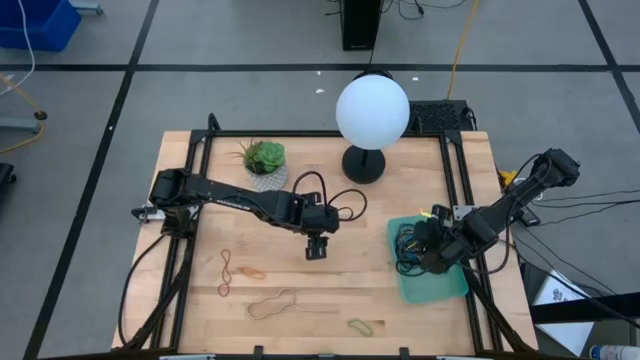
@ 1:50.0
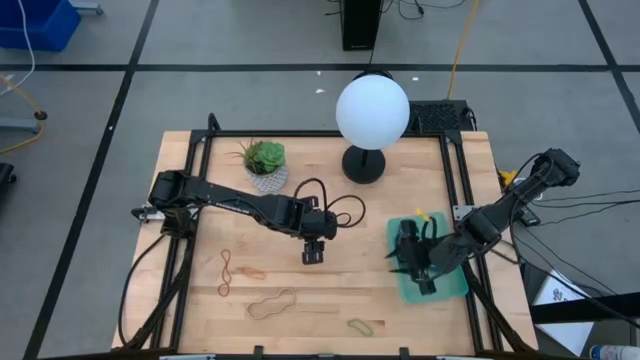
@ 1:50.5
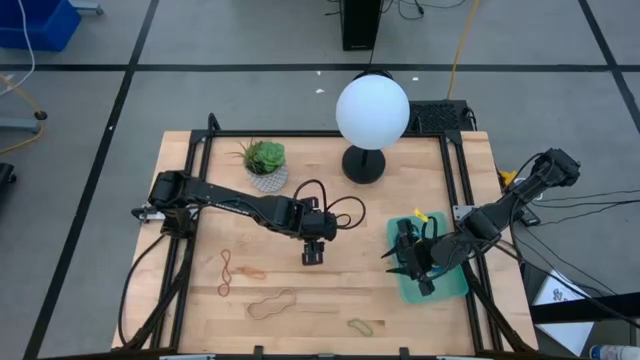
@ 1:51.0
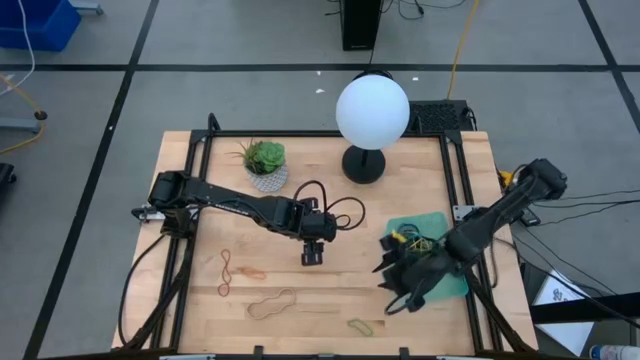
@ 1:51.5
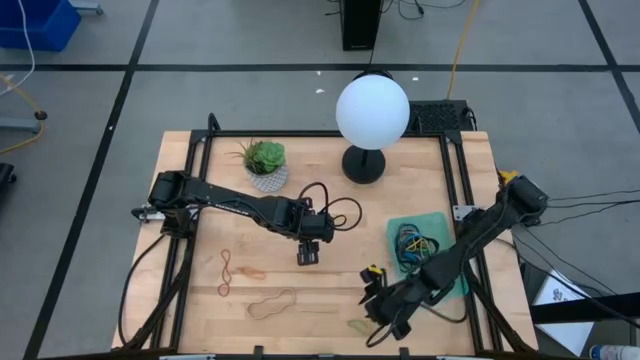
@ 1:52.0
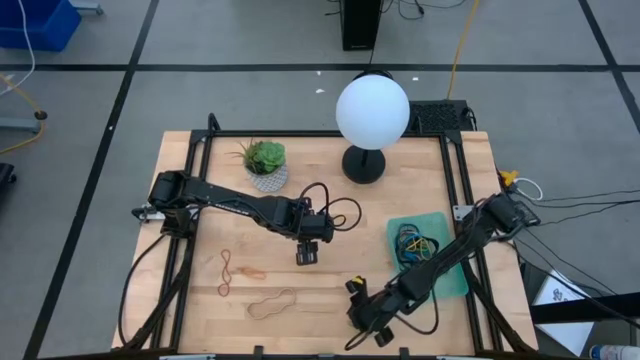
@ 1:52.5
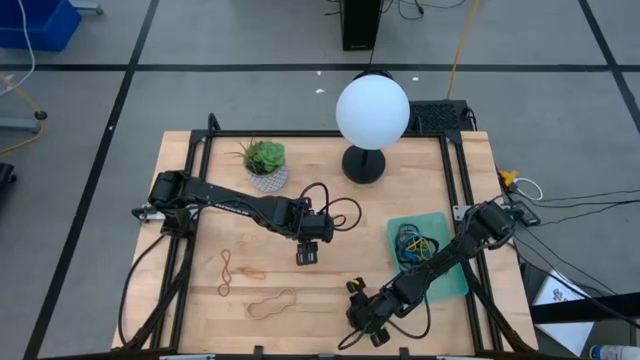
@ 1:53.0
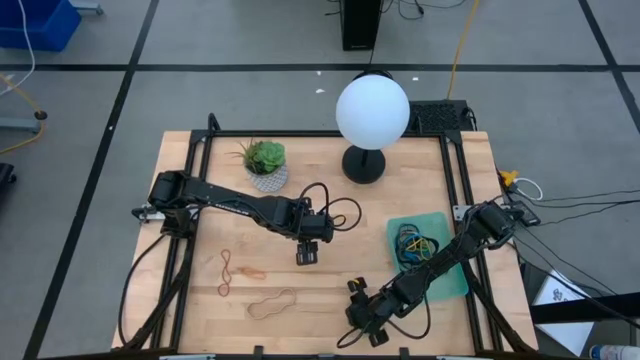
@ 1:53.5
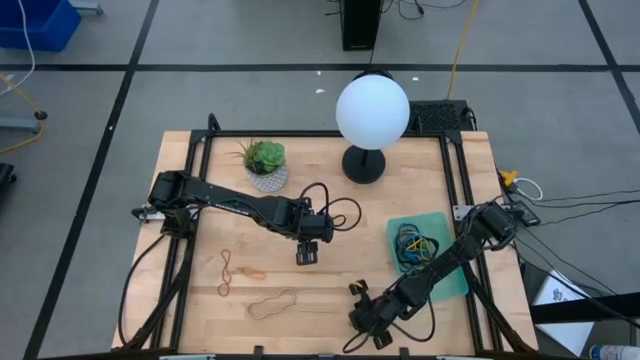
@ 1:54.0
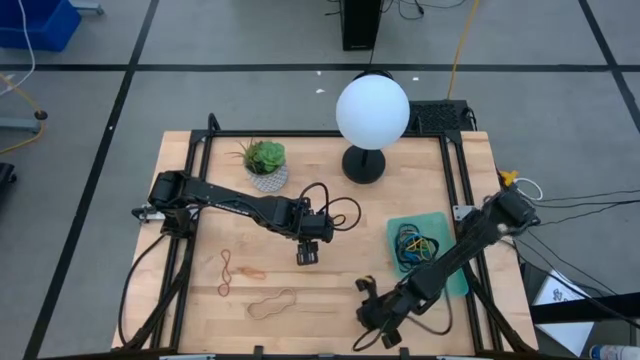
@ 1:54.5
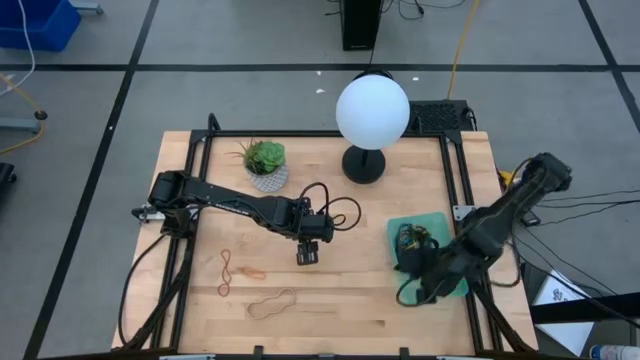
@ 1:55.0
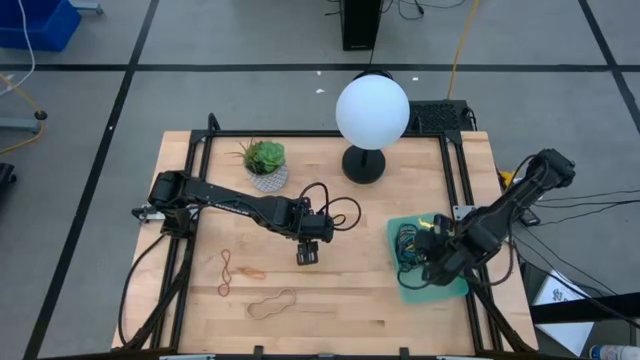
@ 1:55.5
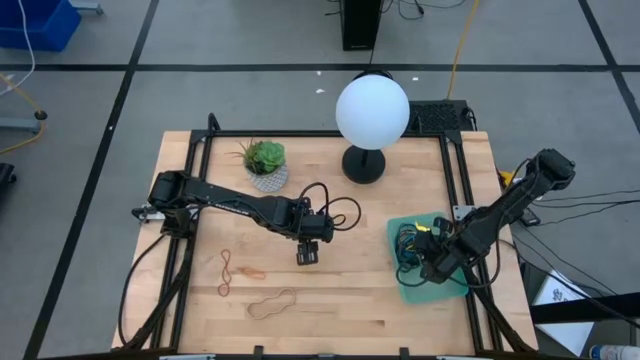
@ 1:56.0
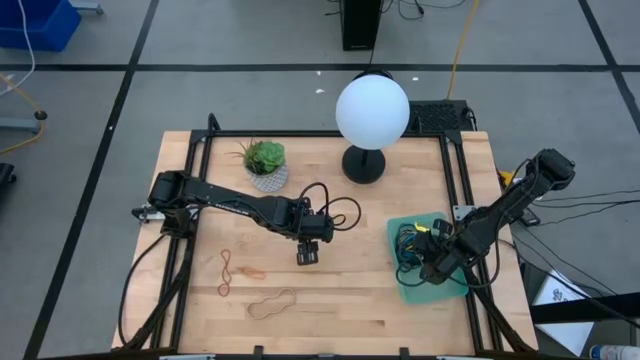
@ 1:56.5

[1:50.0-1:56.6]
Task: Pick and place rubber bands into bin
Put the green rubber band into the bin

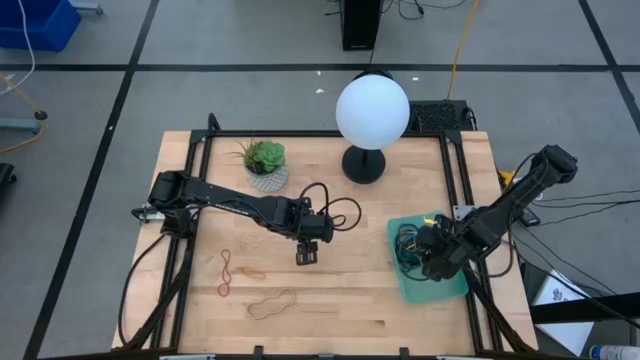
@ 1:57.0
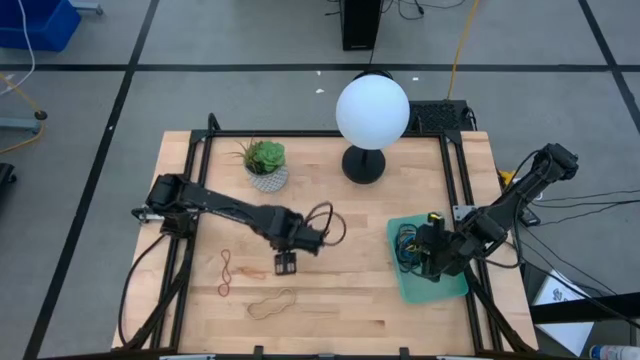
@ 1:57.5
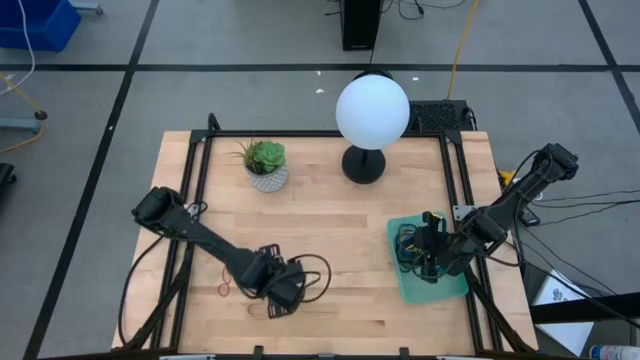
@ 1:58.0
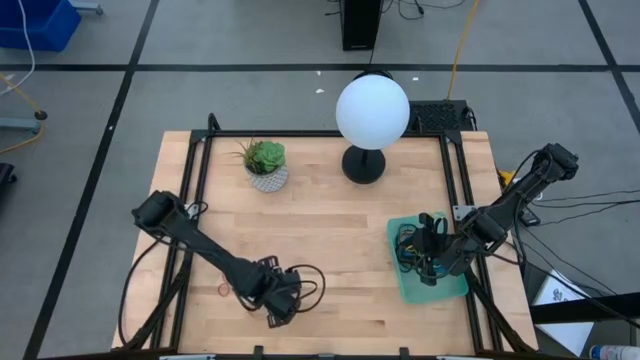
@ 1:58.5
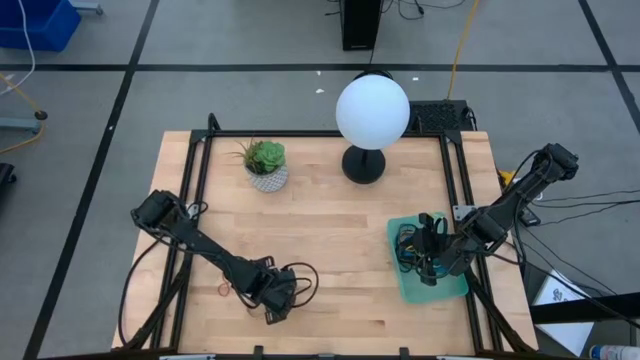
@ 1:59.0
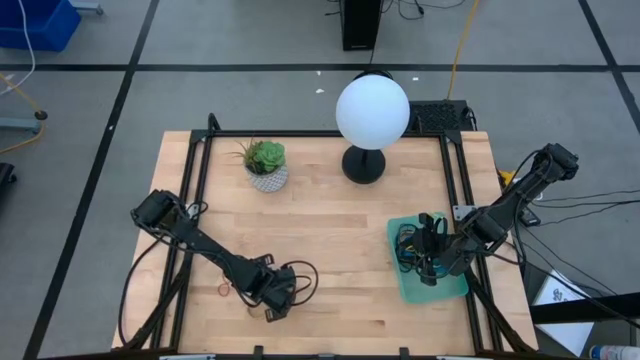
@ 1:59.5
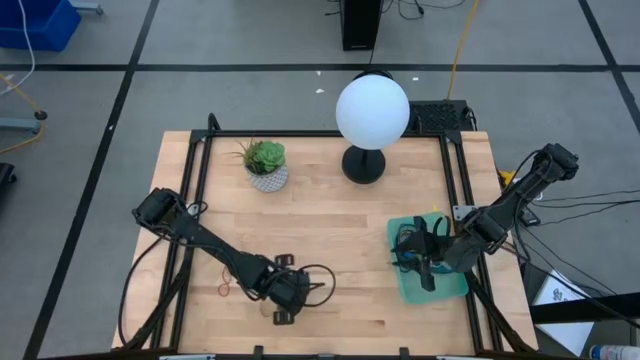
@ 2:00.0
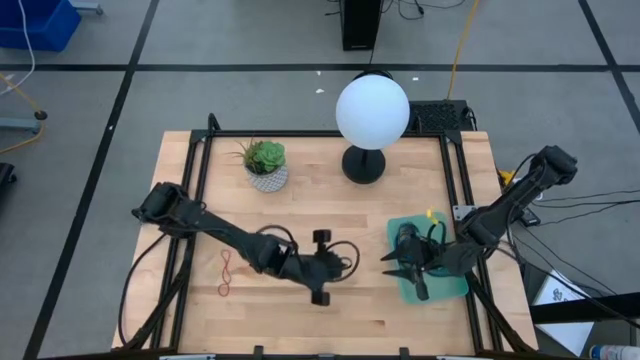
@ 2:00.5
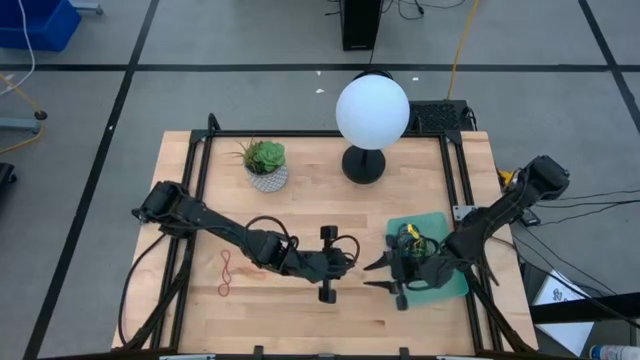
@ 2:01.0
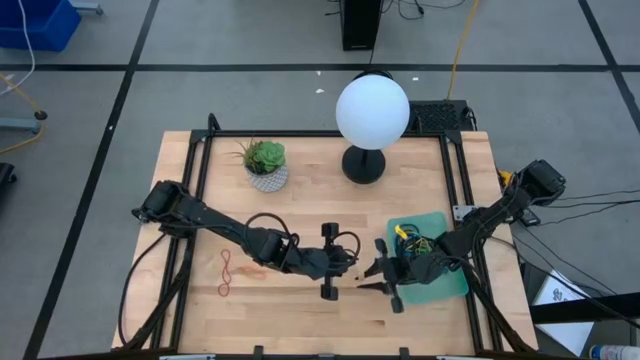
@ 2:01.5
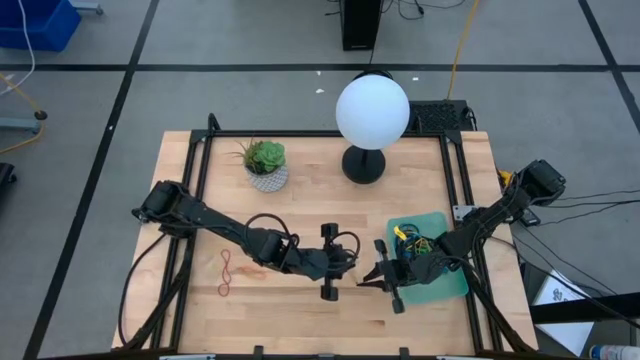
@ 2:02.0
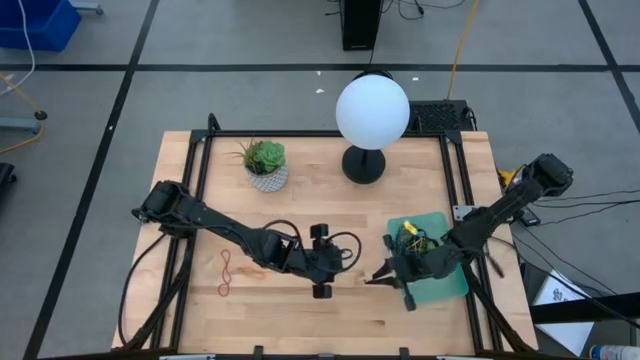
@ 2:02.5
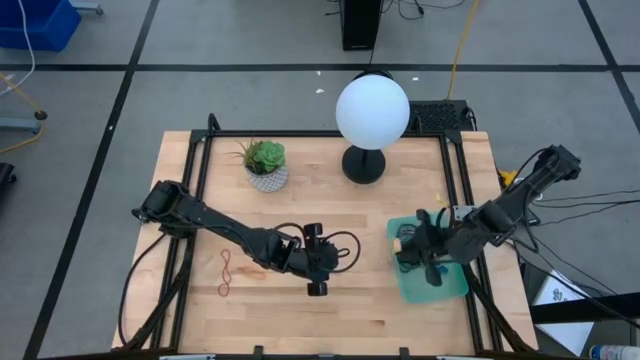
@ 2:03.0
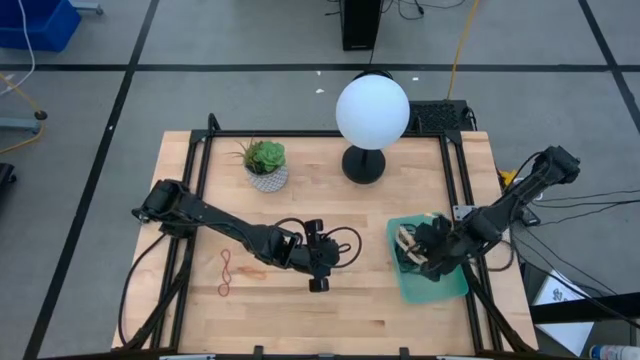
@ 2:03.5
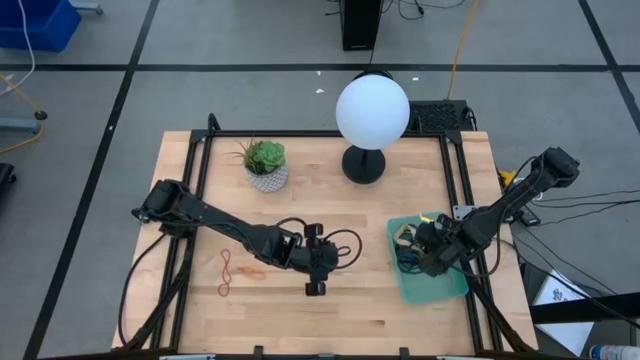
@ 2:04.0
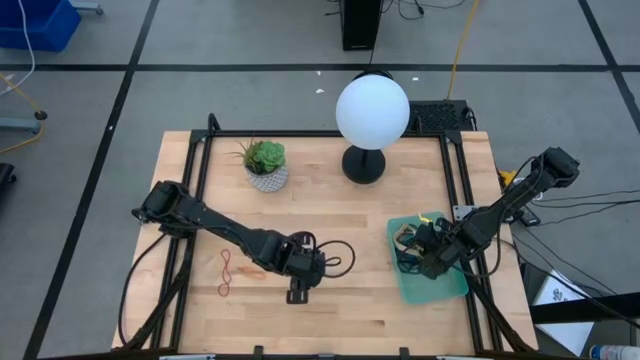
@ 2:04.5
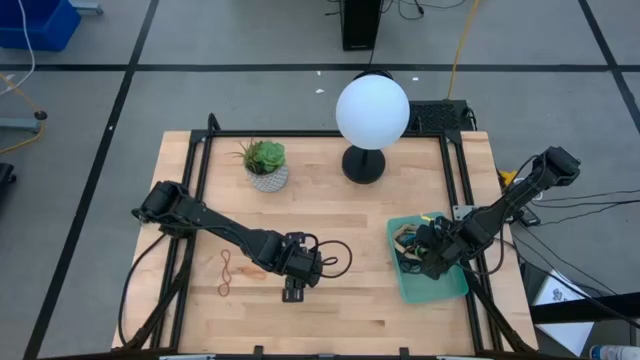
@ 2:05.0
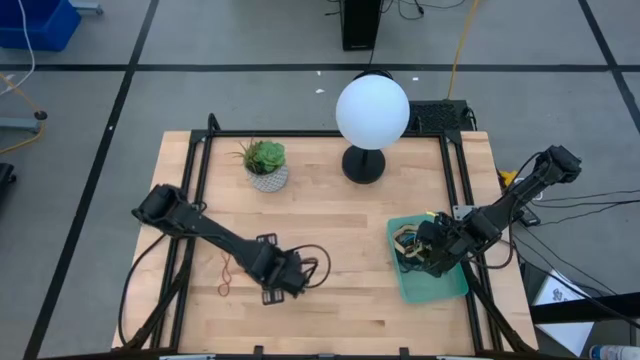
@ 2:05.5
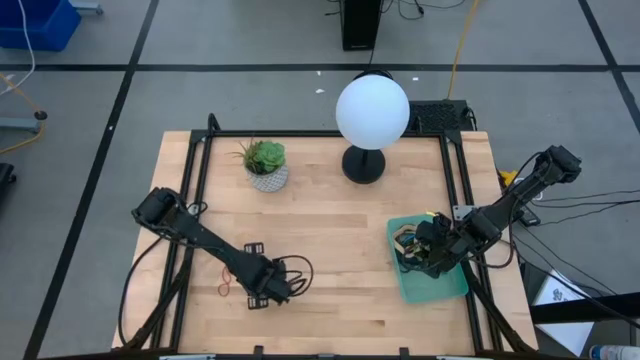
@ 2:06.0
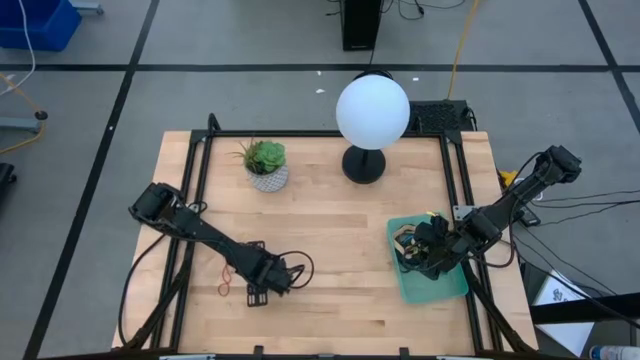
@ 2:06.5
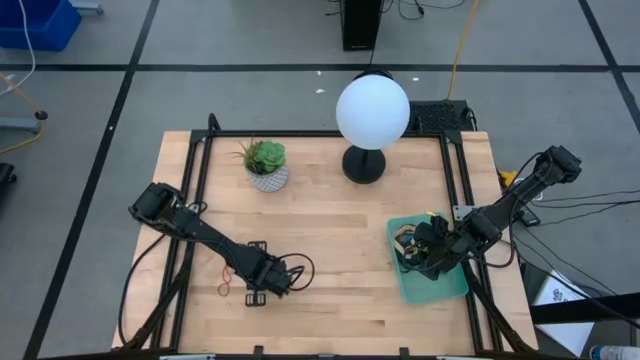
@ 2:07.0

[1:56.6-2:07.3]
Put the white rubber band into the bin

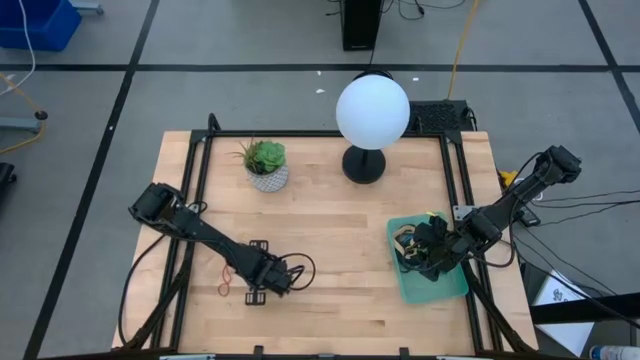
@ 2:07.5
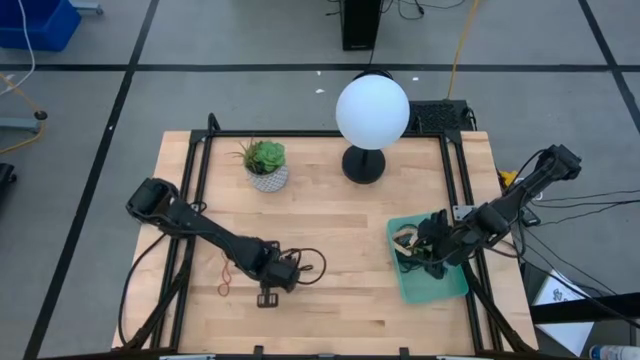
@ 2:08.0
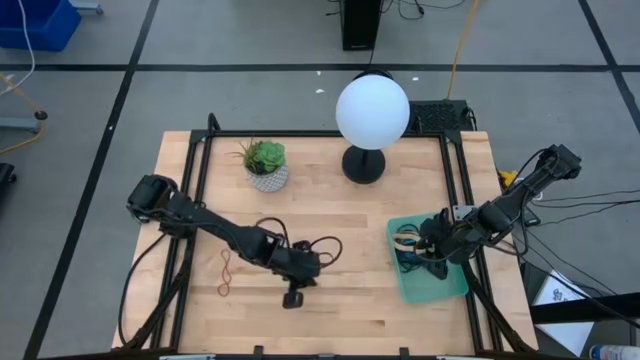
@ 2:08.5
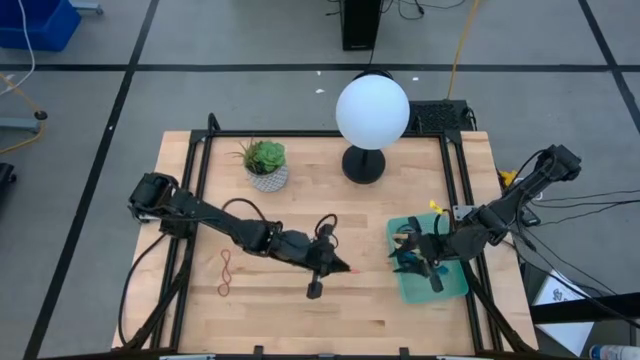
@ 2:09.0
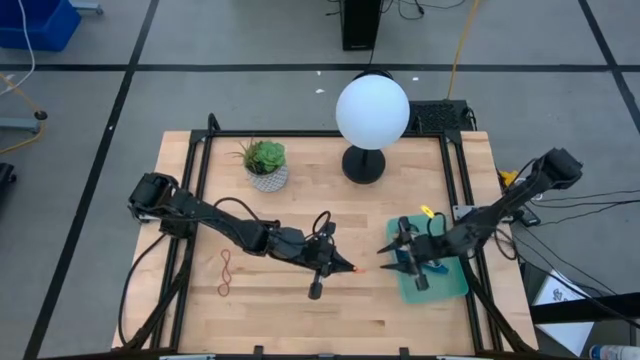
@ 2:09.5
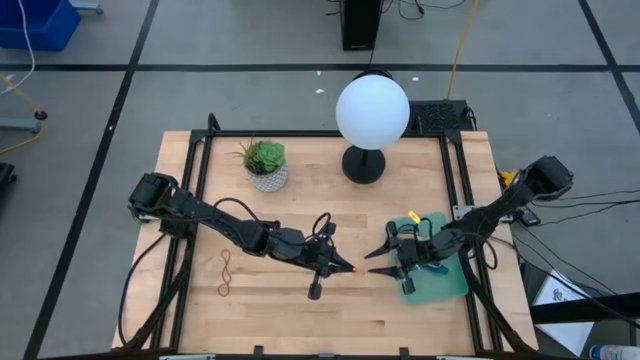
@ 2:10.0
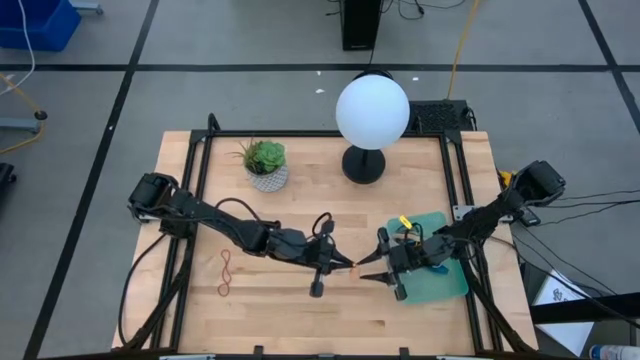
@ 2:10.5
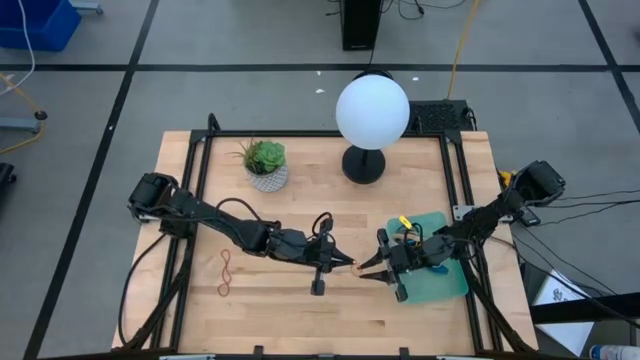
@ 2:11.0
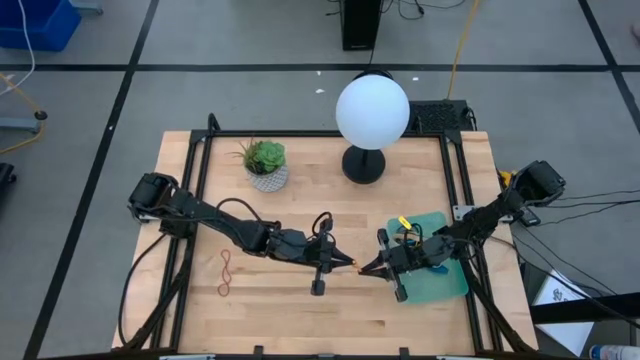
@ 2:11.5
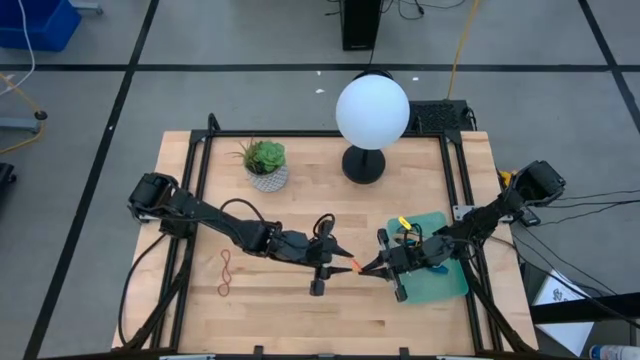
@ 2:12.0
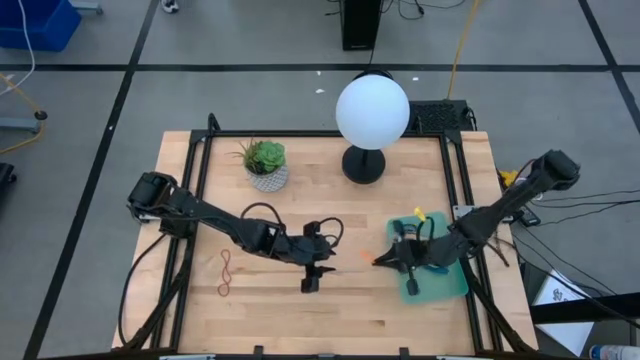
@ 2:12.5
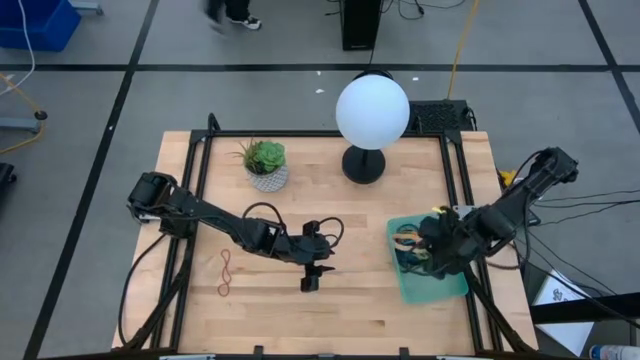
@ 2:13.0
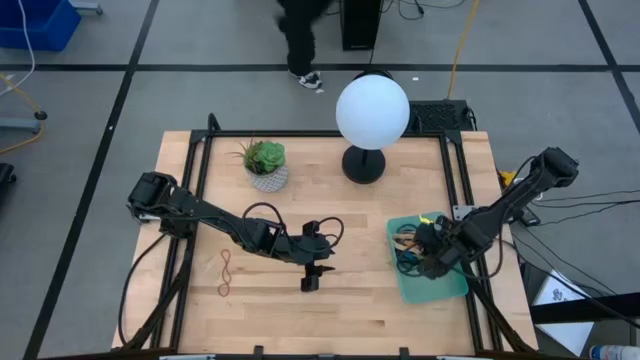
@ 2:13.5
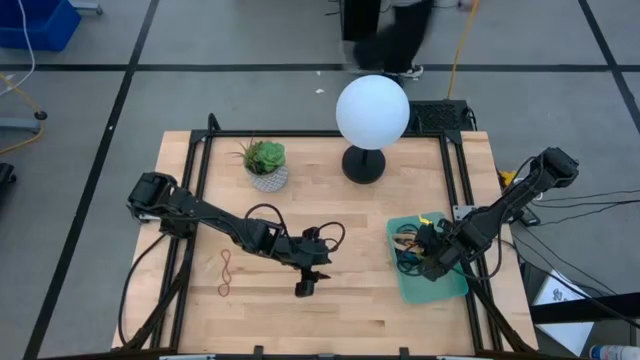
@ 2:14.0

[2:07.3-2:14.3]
Put the orange rubber band into the bin
